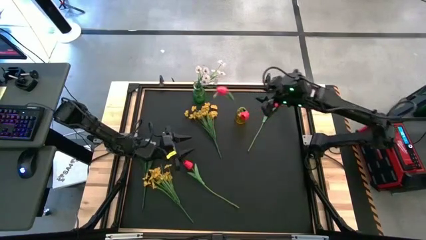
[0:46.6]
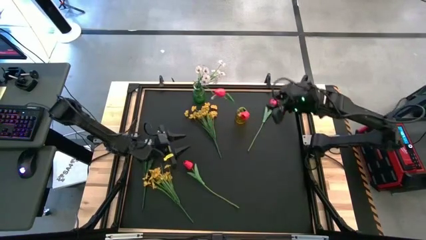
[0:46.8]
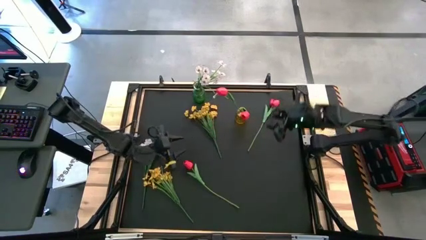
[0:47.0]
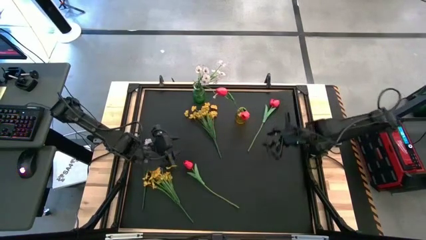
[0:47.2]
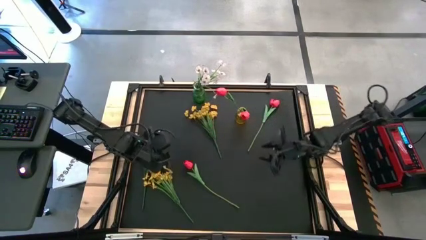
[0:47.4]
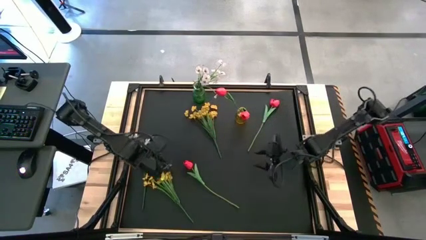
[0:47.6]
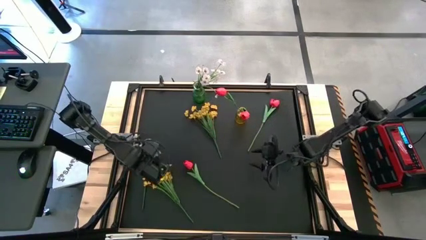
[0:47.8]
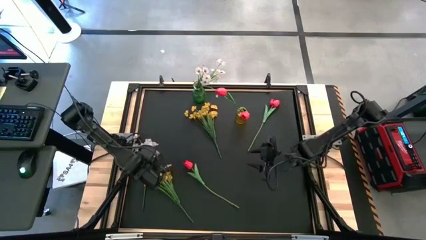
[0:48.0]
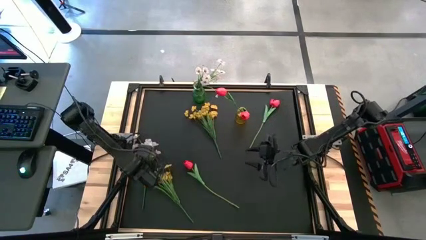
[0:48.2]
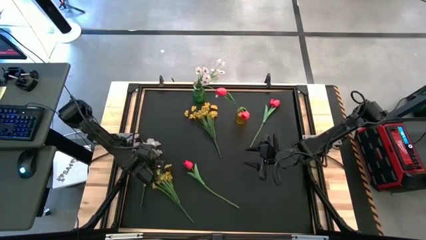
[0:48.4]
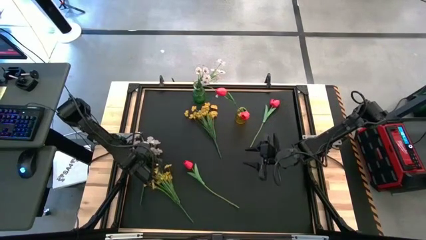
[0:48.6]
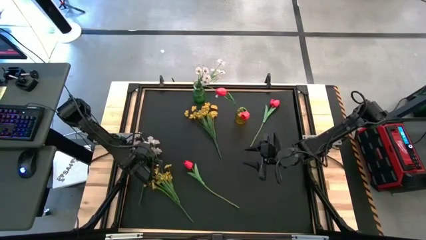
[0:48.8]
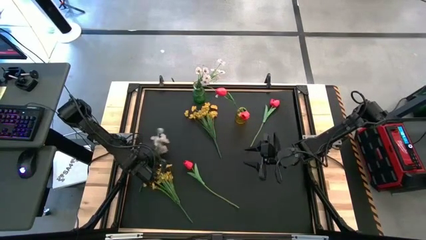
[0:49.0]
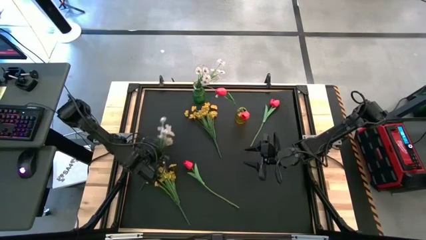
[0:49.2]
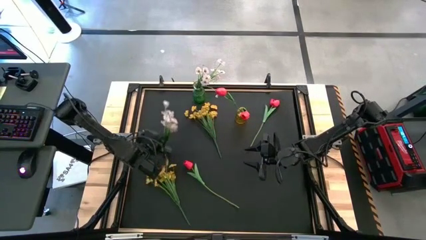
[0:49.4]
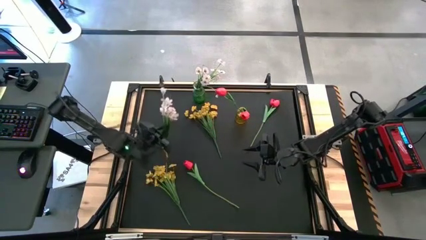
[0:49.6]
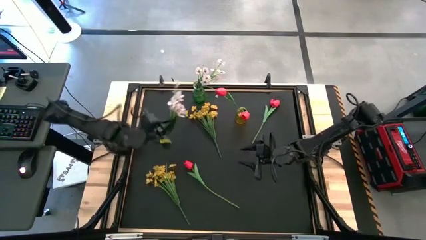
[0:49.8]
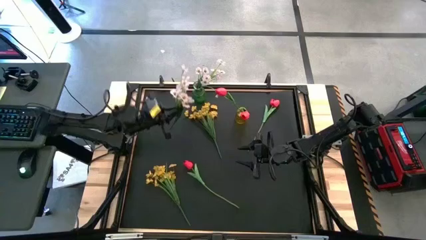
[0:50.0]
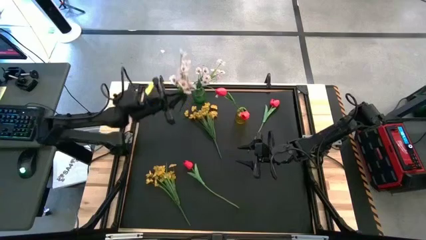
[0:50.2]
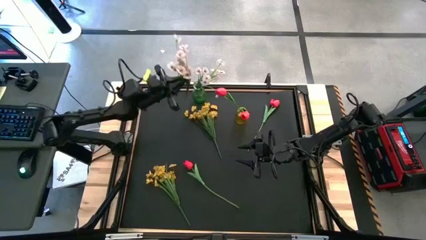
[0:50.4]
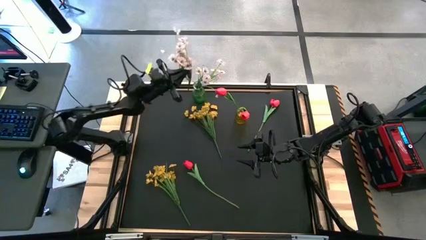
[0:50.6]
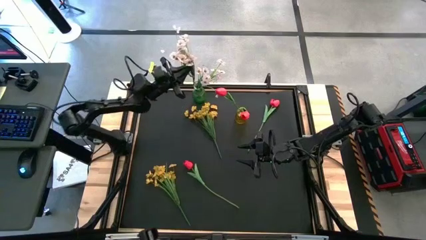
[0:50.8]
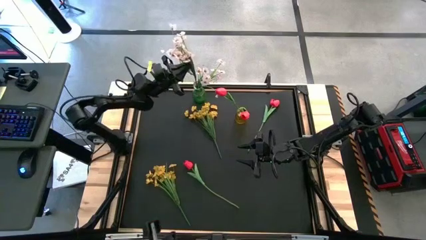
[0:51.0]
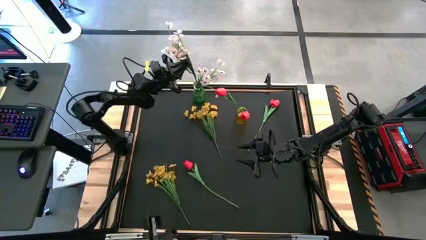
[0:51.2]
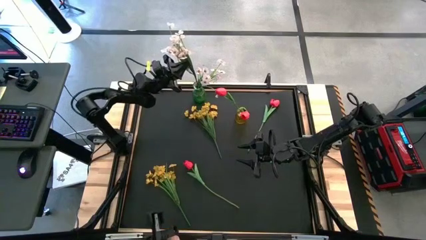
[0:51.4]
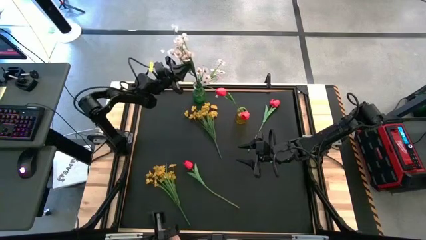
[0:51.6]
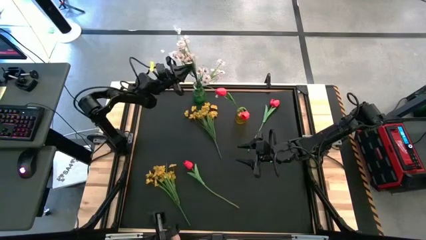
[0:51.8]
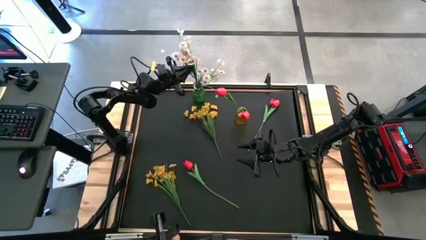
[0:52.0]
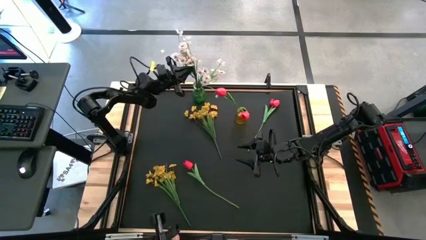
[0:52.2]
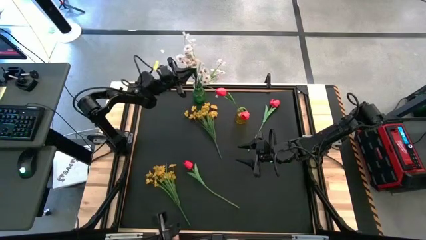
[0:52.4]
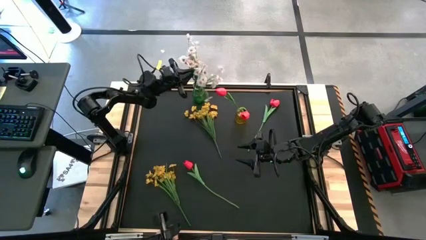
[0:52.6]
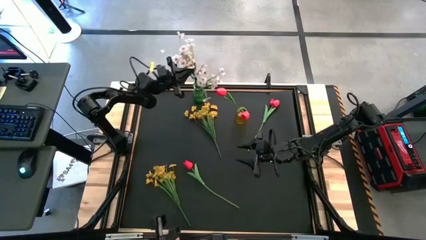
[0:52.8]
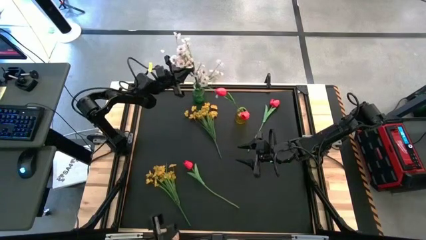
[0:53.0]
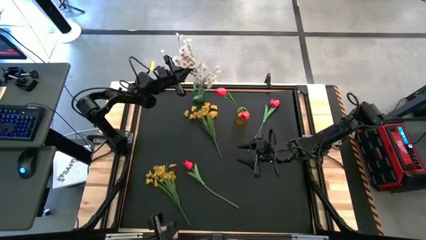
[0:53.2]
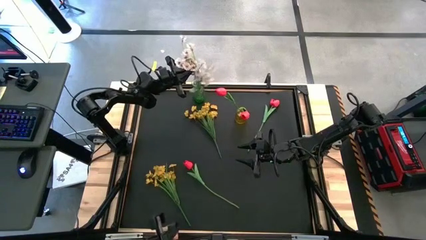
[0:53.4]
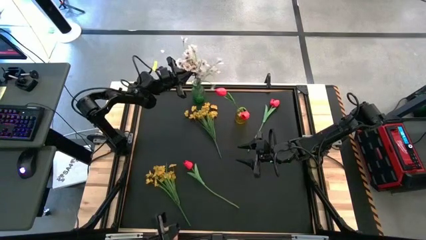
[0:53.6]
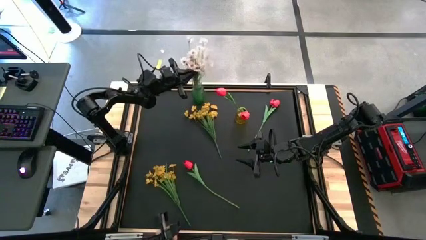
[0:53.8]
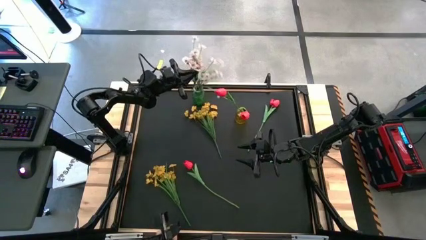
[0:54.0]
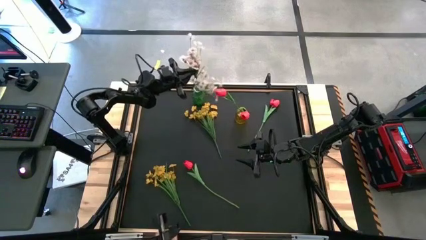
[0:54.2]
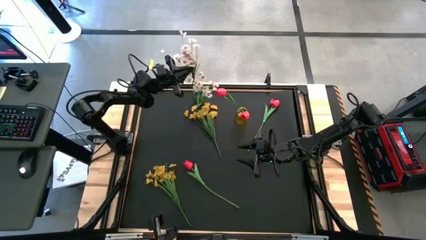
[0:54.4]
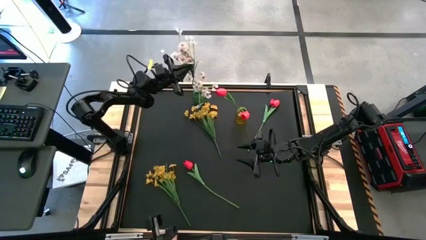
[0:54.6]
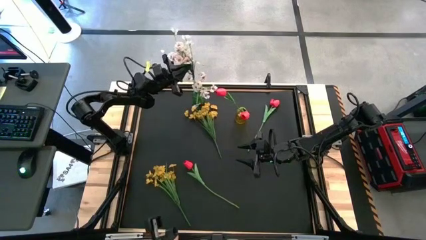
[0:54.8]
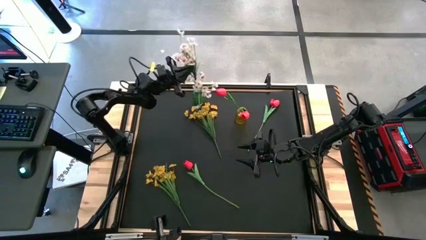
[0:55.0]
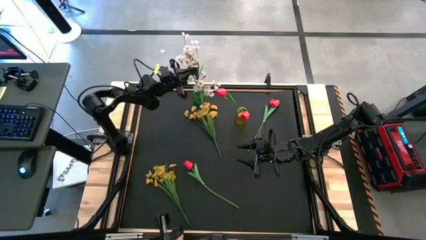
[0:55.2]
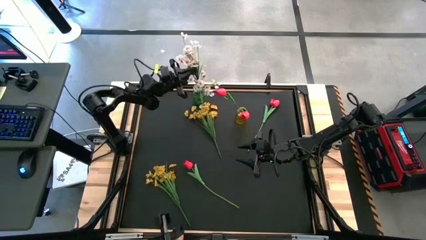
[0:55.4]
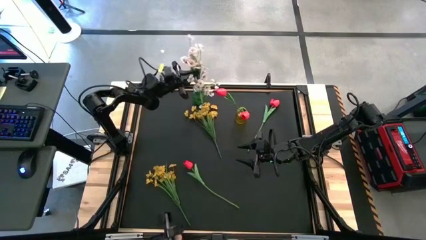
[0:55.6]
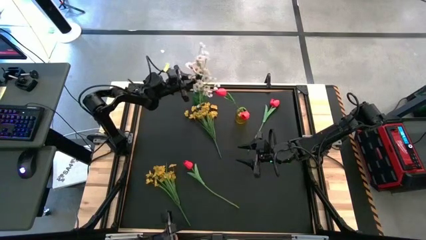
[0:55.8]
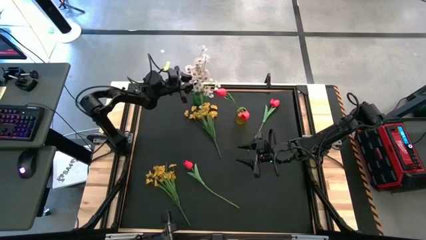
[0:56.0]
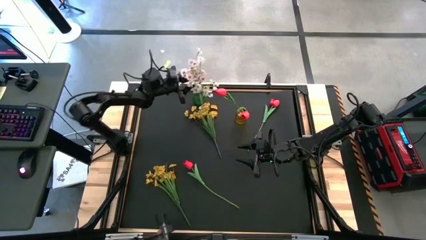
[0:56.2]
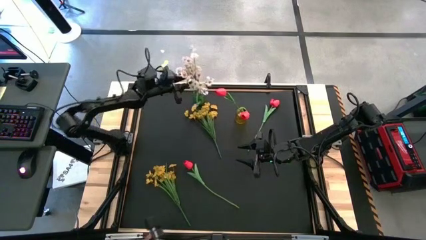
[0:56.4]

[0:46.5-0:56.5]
Task: Sort flowers into vase by color
Put the white flowers into the green vase

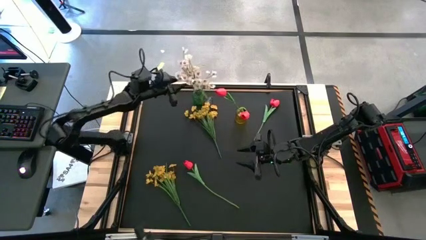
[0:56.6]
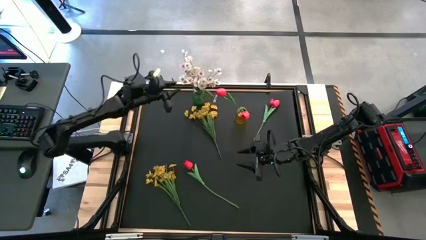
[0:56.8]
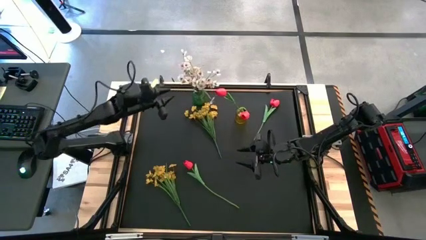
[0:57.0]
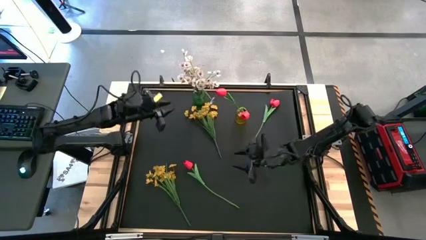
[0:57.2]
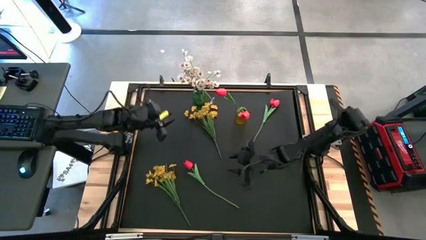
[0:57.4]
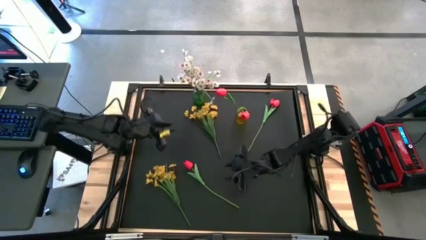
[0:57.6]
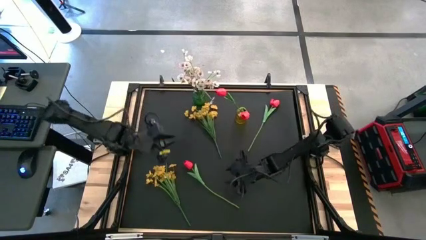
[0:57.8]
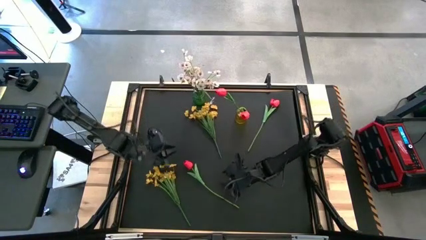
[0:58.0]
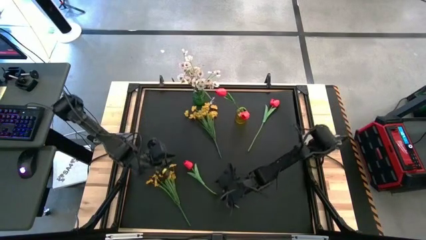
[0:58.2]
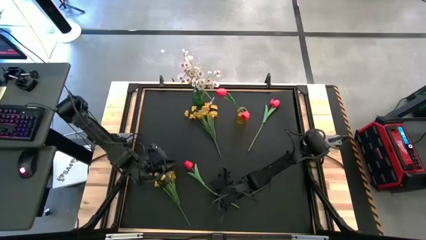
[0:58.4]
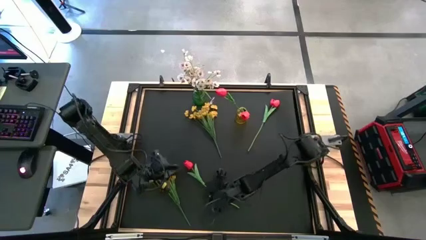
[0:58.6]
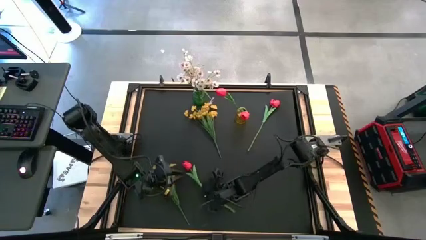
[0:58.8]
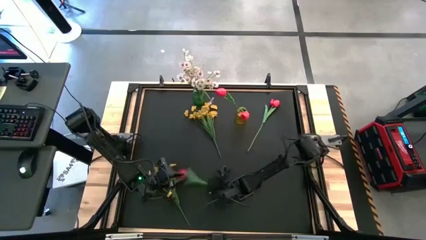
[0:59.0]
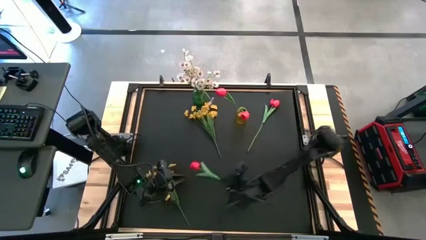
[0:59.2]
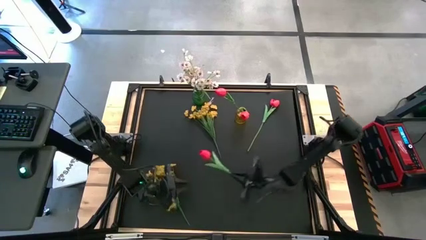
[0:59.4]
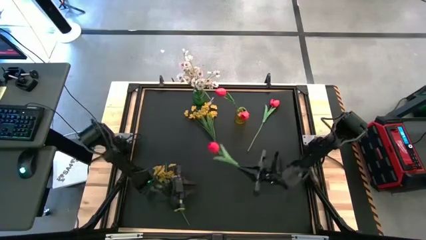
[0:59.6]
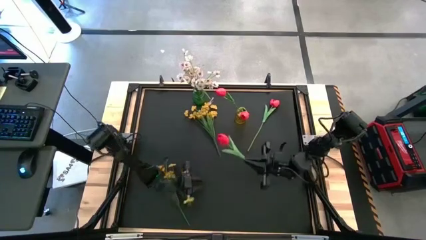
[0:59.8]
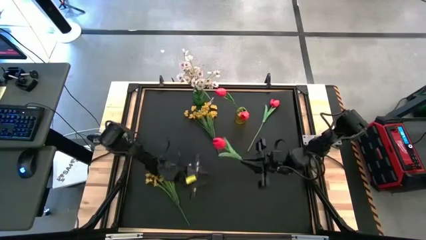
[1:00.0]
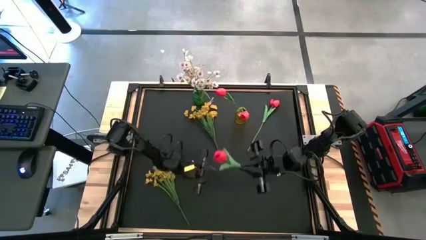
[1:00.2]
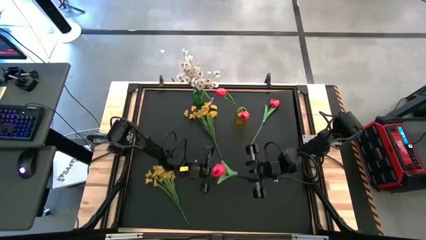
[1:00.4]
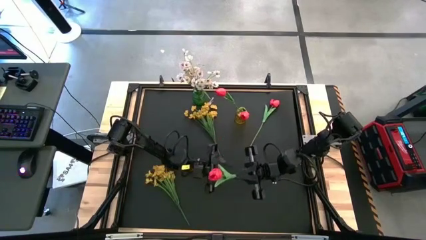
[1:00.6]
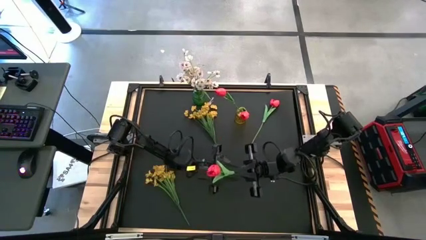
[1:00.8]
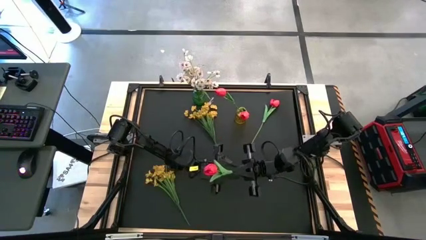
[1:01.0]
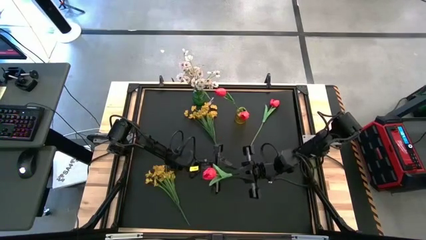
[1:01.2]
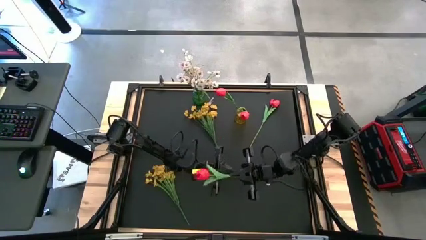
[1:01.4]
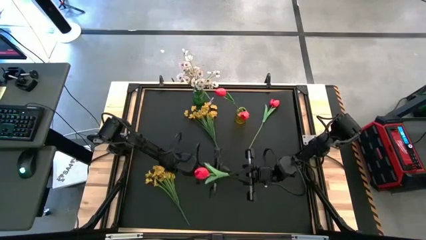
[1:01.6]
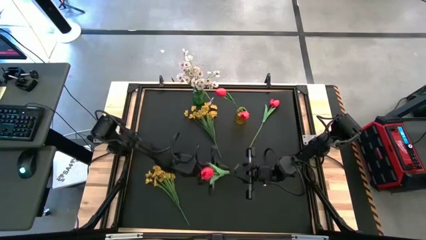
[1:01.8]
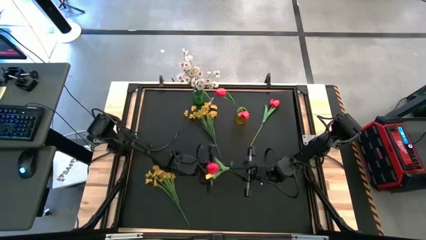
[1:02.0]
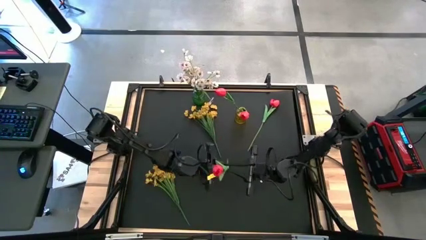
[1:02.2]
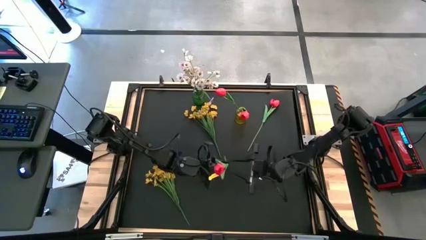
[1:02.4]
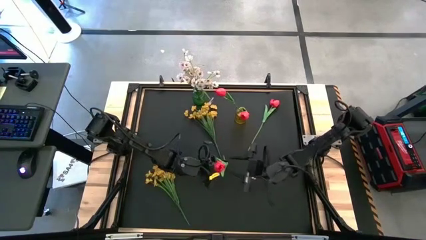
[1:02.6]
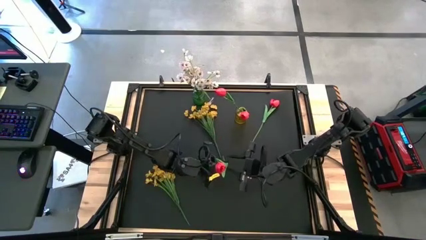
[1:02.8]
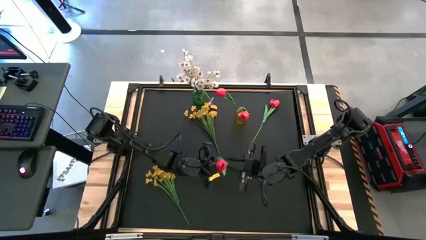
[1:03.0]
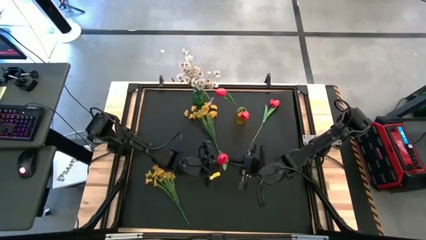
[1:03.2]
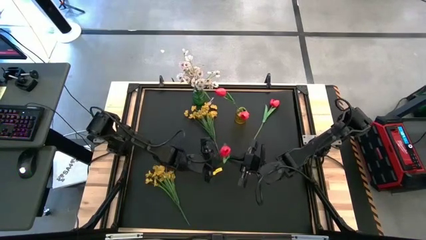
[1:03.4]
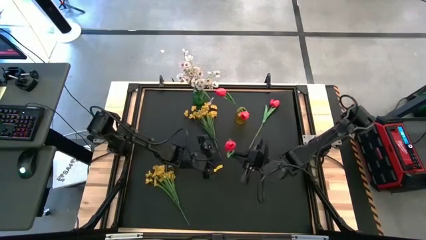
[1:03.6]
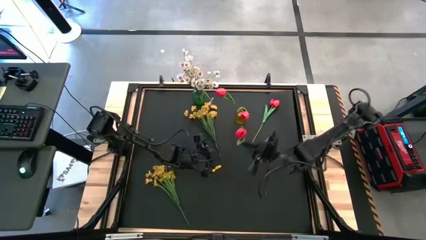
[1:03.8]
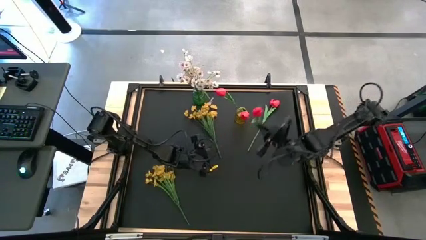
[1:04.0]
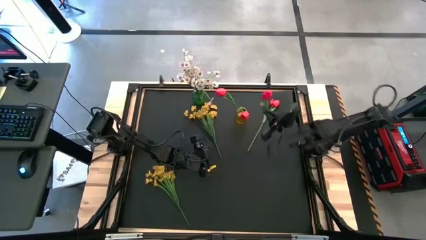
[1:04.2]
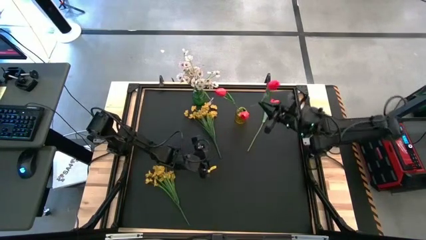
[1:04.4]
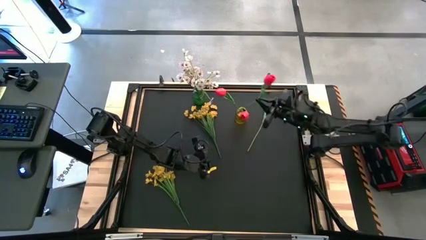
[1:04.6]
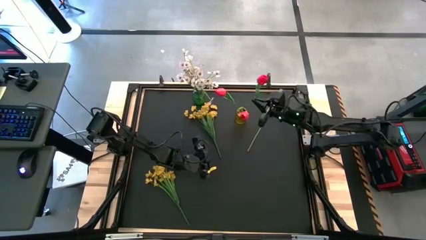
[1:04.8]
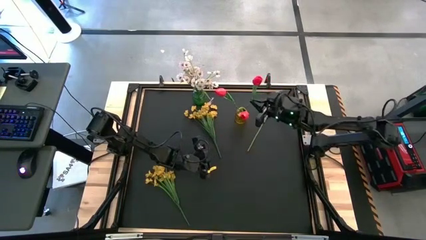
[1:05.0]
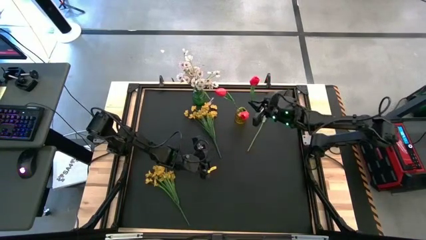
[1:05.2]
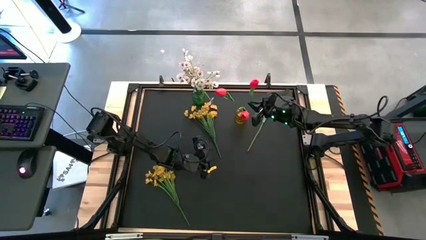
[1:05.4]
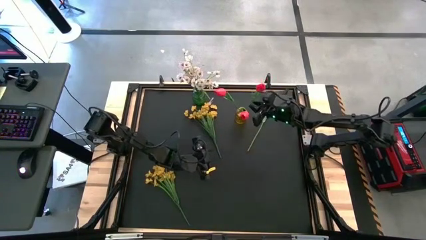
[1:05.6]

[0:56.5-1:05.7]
Put the bottom pink flower into the yellow vase
